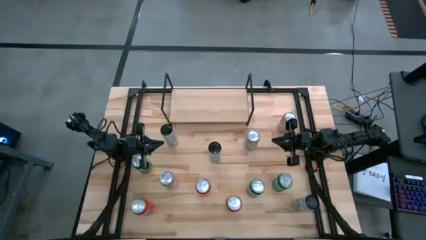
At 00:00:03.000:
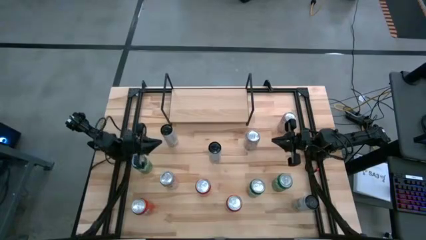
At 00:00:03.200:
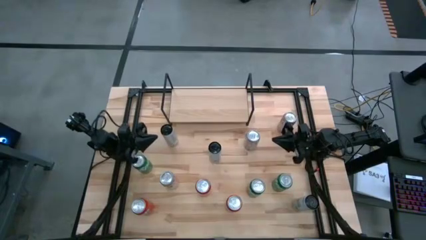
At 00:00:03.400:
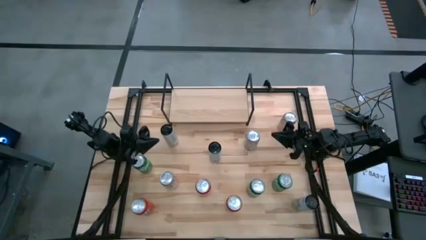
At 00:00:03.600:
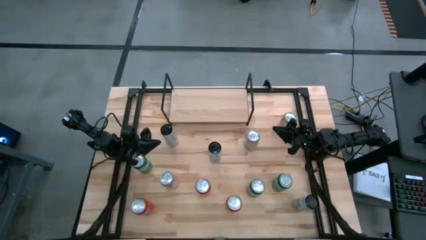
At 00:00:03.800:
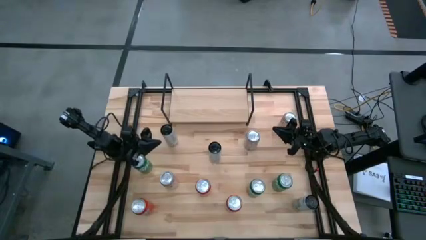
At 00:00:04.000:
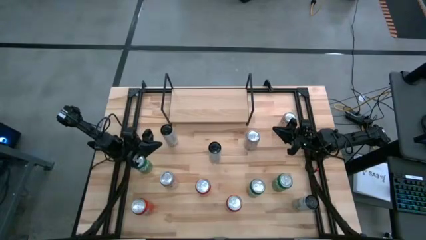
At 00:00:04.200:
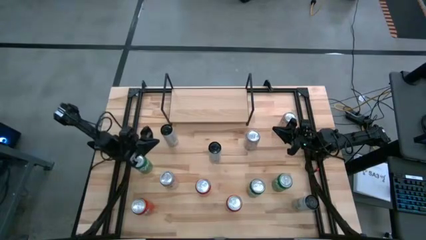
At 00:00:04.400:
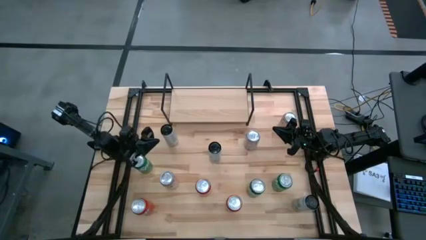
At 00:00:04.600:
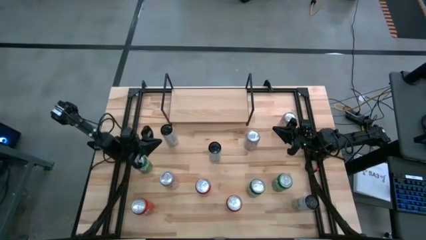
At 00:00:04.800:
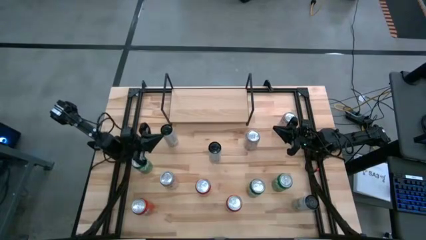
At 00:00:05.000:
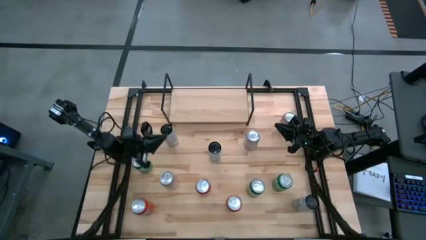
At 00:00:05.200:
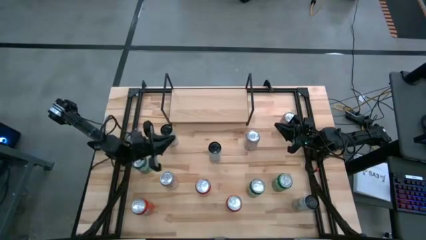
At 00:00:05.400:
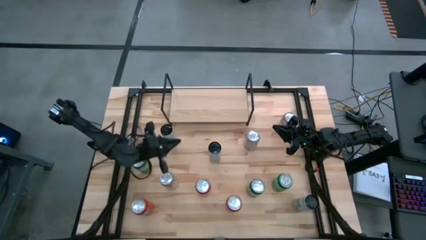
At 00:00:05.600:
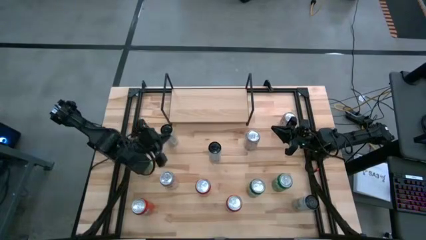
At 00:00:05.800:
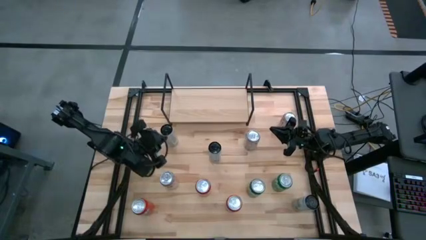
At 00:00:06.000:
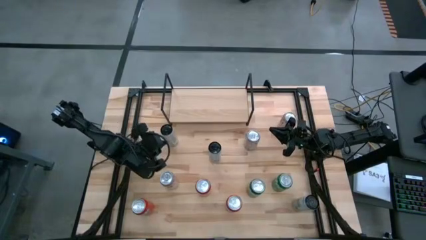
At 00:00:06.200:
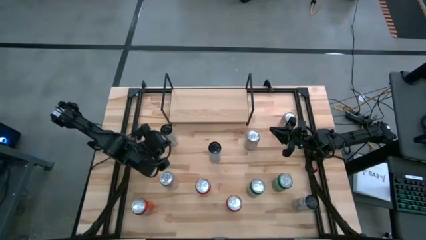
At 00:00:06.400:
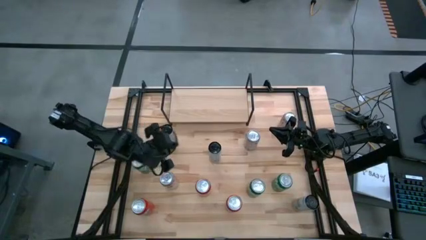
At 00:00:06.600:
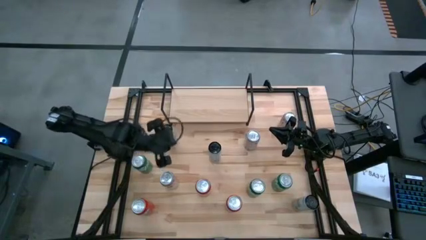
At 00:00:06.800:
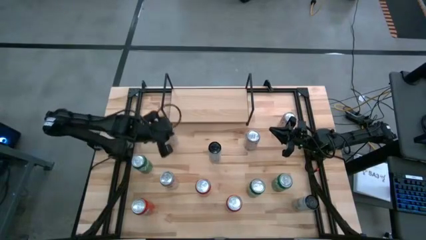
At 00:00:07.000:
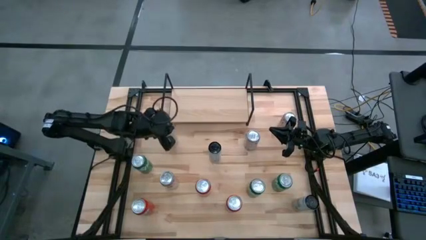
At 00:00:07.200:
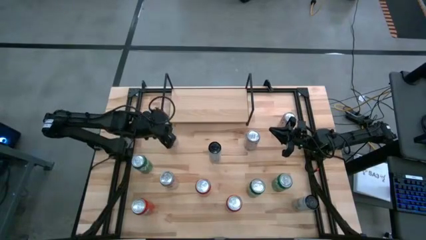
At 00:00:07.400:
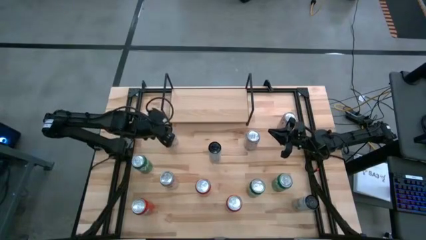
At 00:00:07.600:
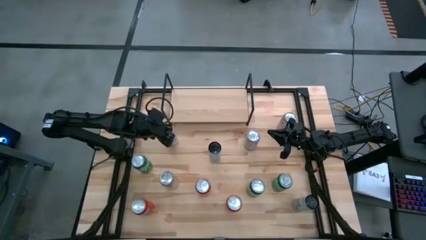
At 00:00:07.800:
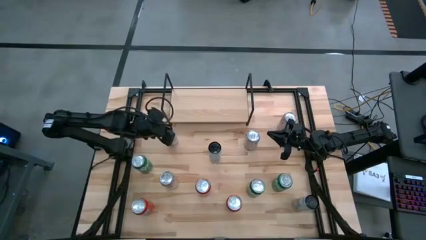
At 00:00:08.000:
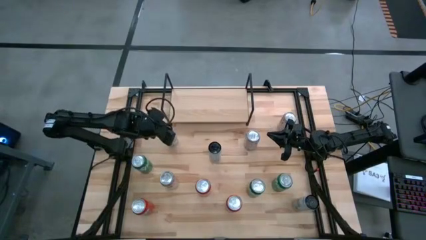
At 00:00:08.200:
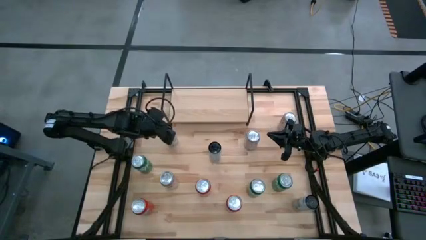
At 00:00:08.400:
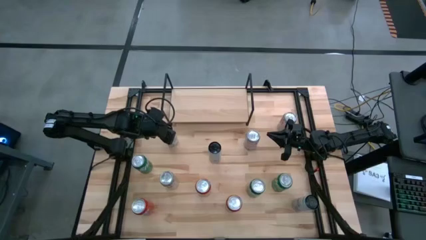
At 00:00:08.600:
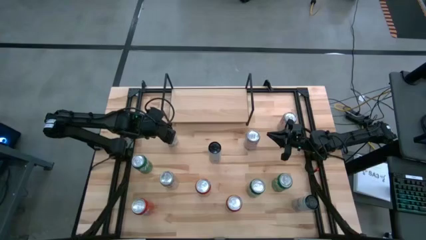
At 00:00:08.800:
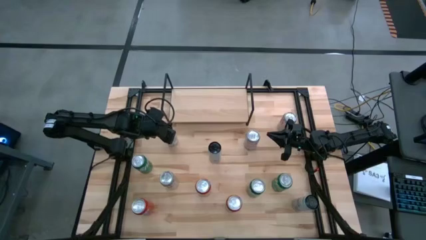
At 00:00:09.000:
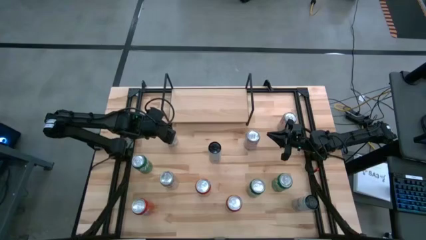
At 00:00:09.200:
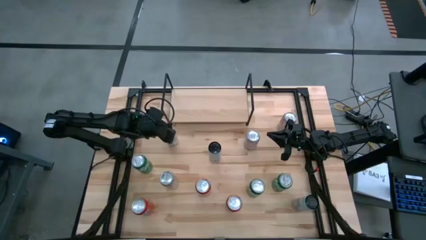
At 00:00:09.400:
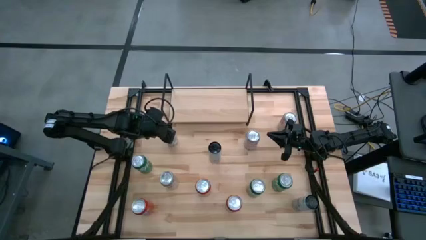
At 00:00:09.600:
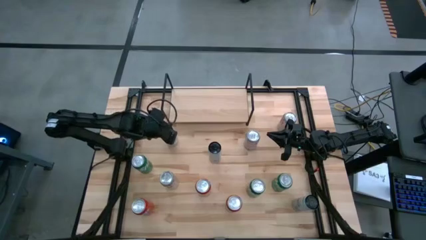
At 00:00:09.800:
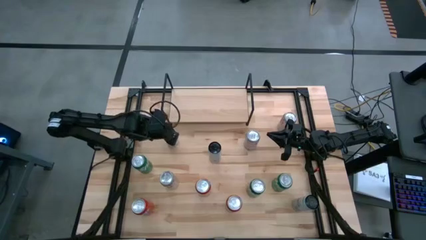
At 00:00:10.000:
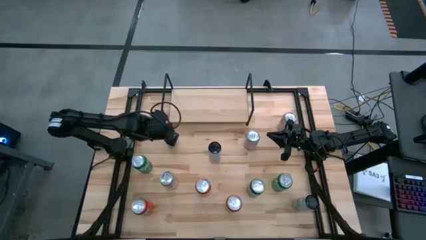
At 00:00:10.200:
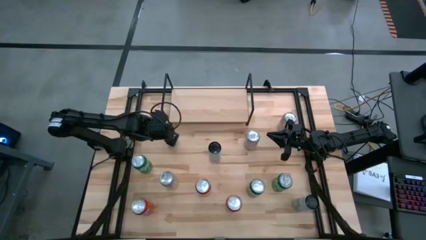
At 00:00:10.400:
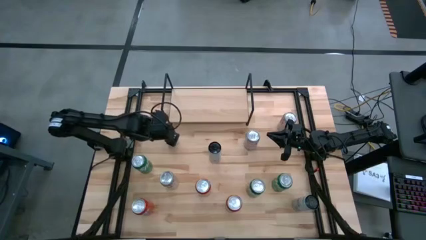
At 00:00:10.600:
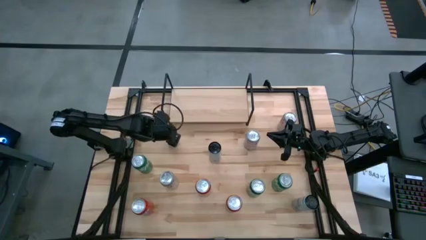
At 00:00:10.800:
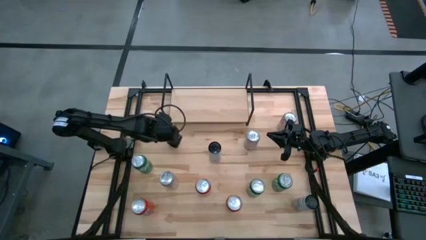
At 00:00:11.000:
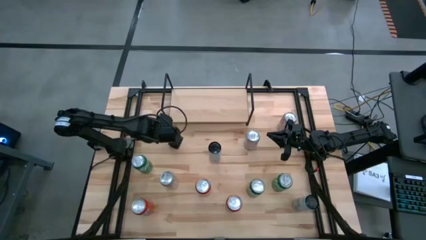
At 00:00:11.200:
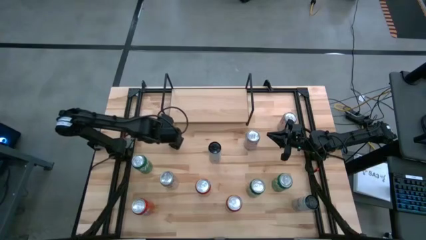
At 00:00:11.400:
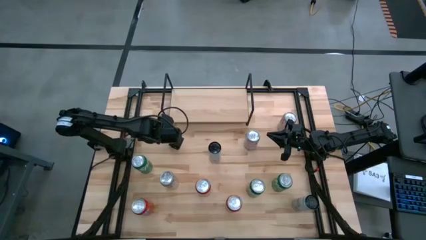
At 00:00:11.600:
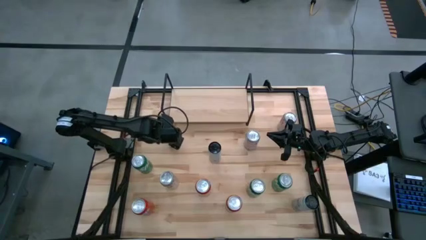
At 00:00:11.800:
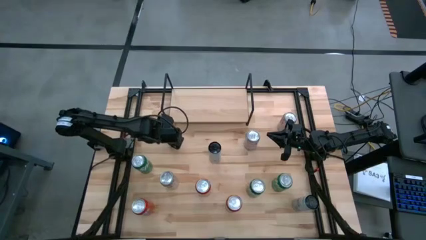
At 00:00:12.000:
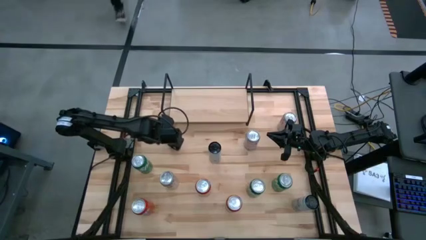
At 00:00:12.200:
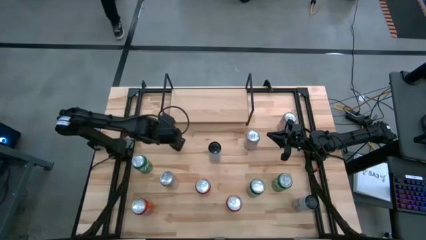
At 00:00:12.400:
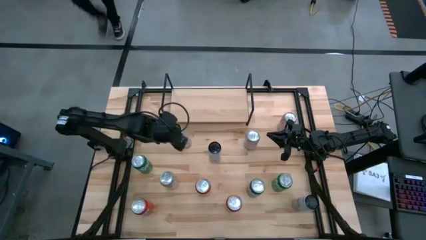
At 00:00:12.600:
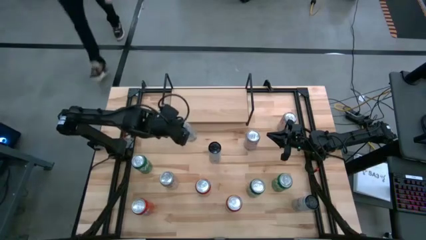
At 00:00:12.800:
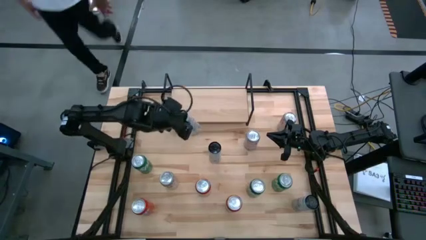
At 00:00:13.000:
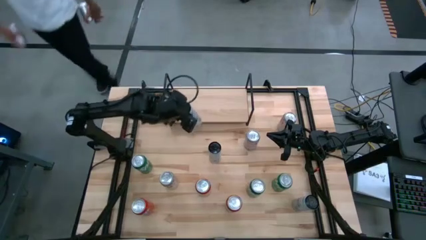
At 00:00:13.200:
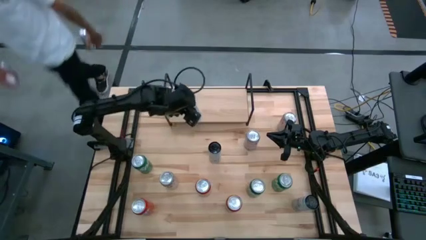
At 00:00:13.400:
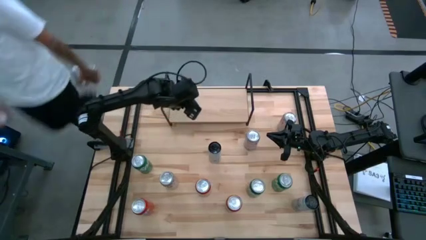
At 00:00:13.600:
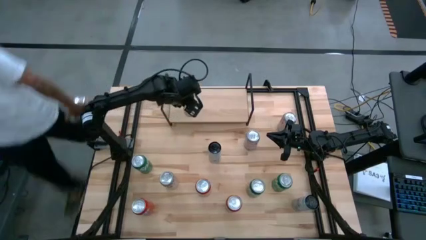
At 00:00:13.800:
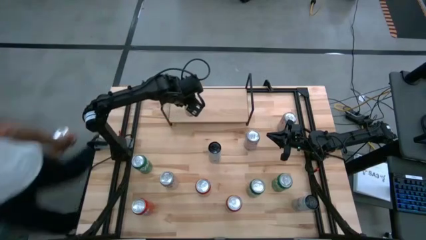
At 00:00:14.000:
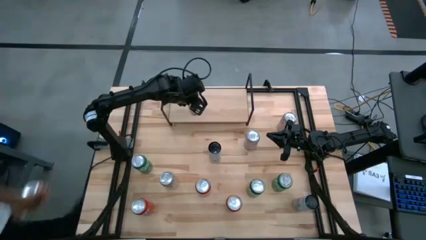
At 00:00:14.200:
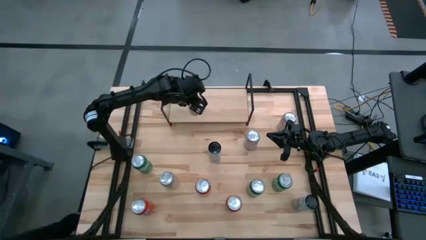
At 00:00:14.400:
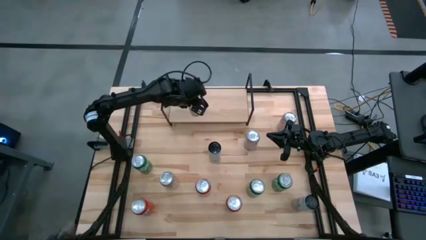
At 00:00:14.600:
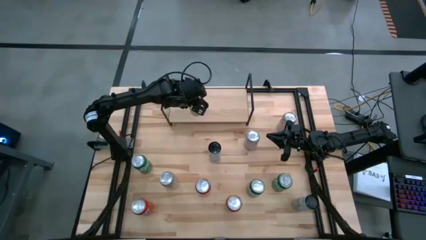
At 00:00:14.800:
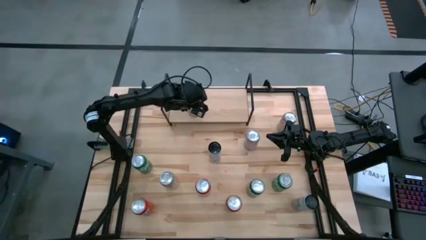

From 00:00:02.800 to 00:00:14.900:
Task: Sort soda cans
Put the white yellow soda can on the shelf
